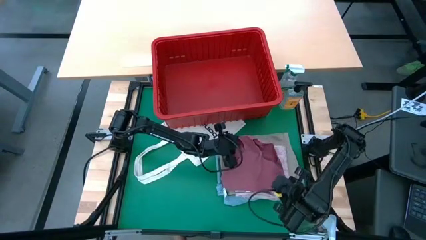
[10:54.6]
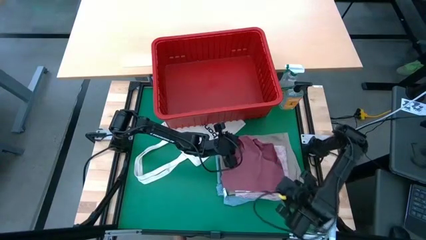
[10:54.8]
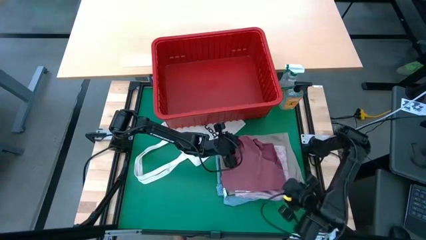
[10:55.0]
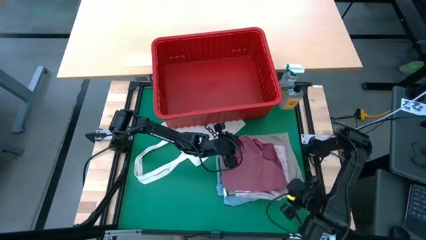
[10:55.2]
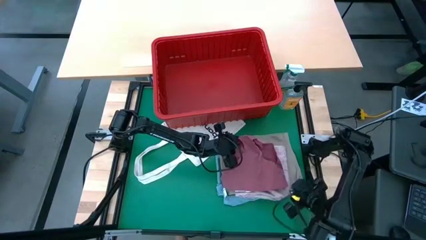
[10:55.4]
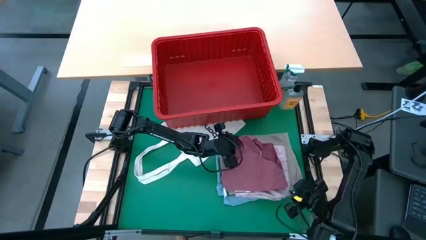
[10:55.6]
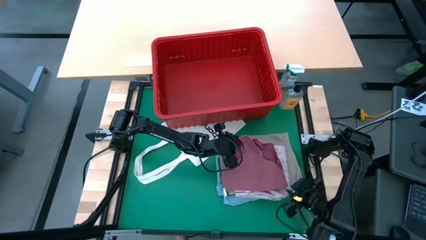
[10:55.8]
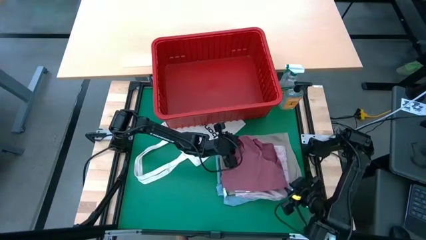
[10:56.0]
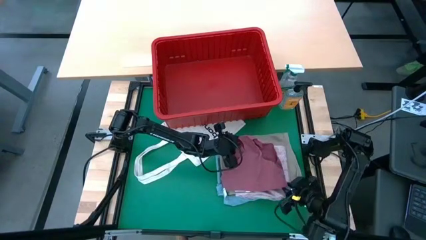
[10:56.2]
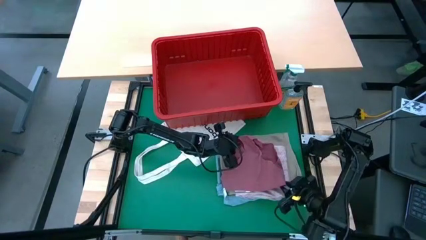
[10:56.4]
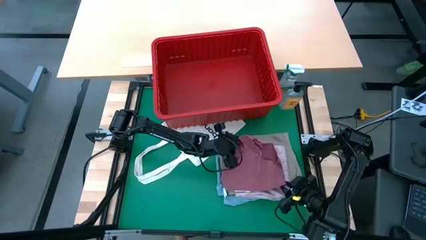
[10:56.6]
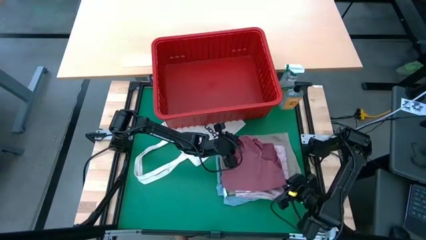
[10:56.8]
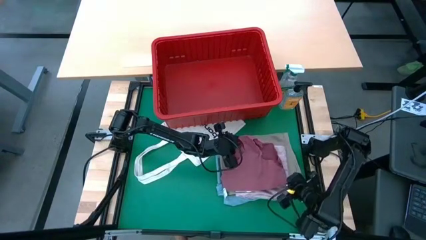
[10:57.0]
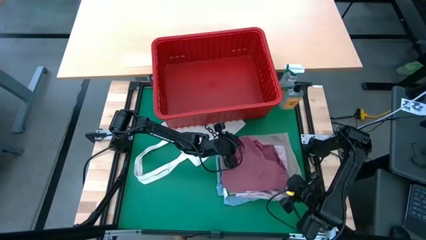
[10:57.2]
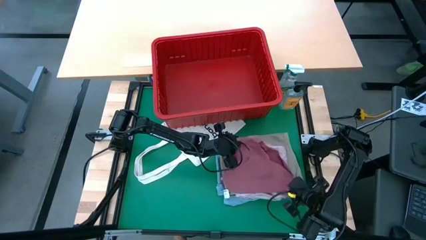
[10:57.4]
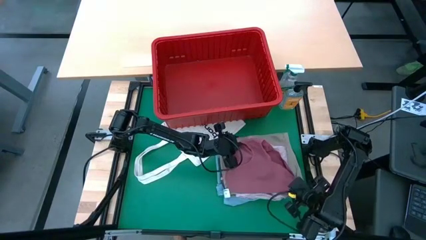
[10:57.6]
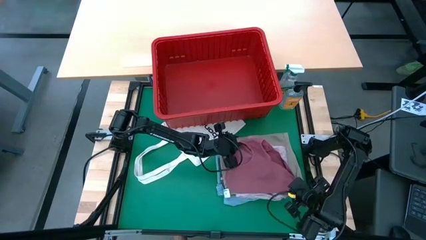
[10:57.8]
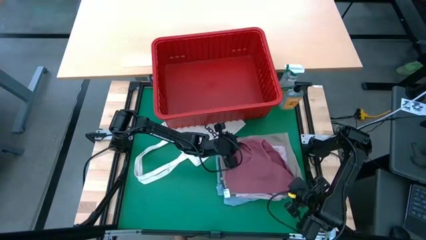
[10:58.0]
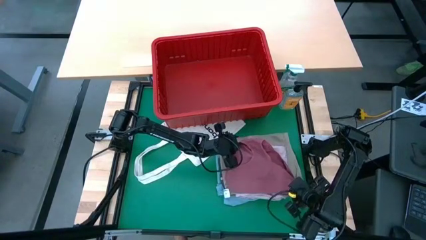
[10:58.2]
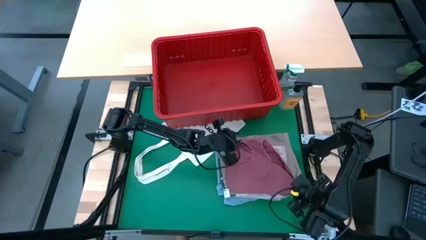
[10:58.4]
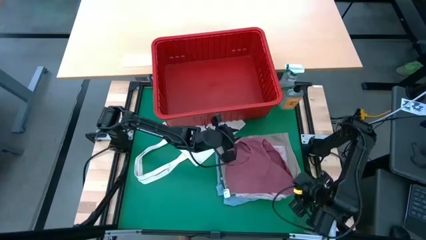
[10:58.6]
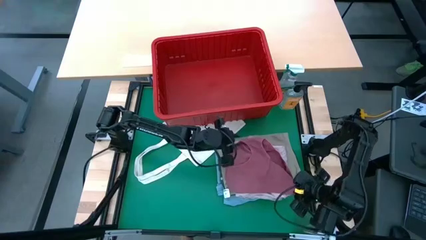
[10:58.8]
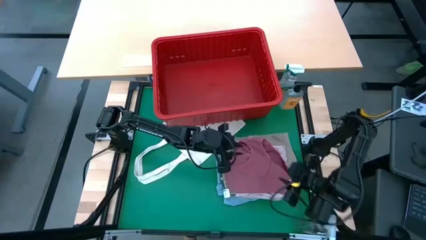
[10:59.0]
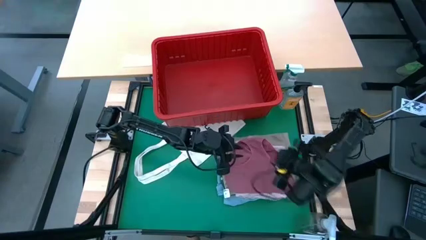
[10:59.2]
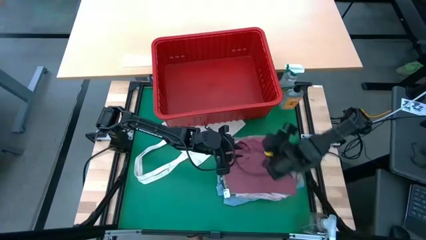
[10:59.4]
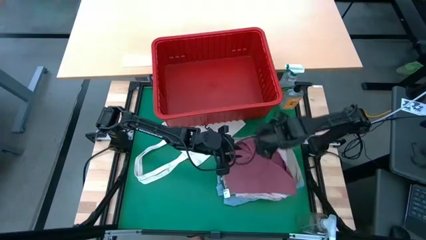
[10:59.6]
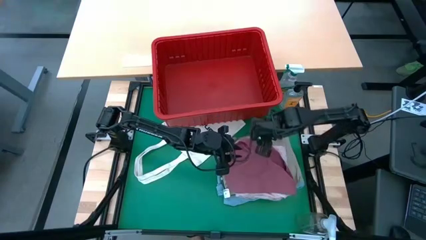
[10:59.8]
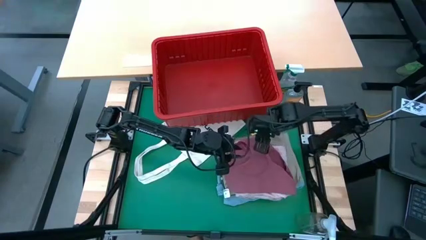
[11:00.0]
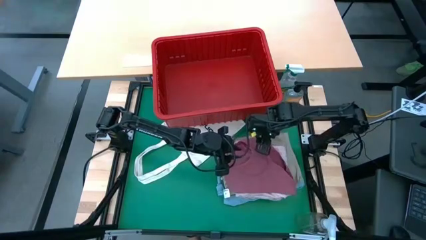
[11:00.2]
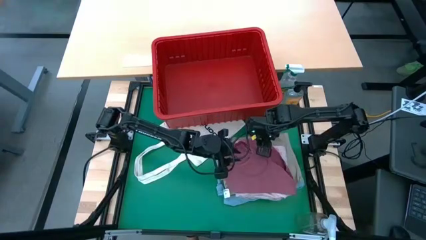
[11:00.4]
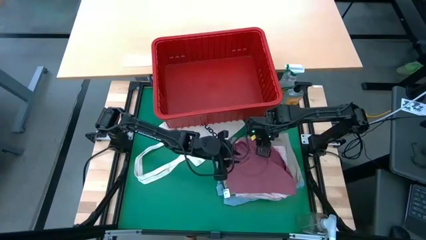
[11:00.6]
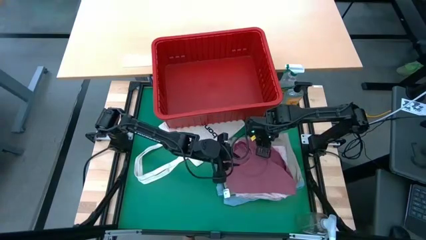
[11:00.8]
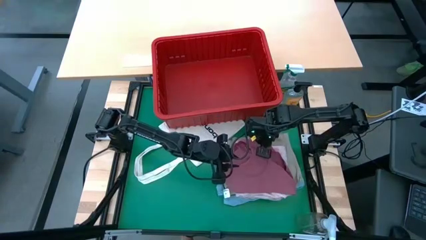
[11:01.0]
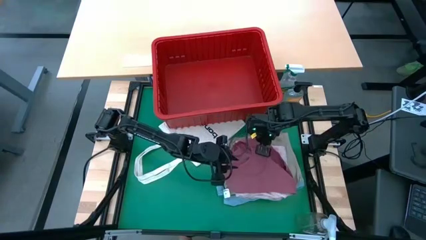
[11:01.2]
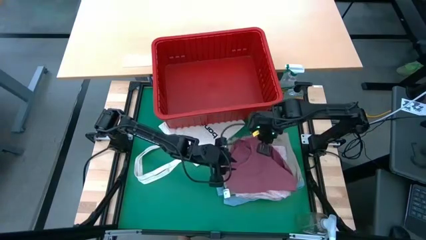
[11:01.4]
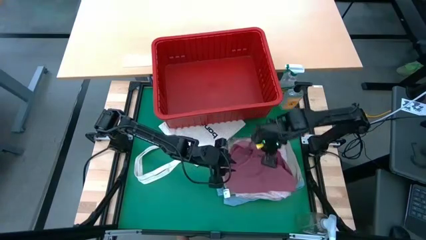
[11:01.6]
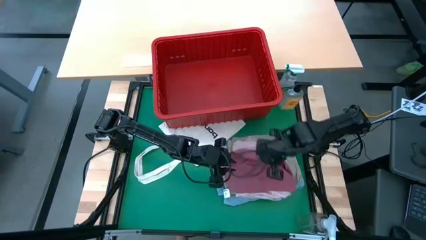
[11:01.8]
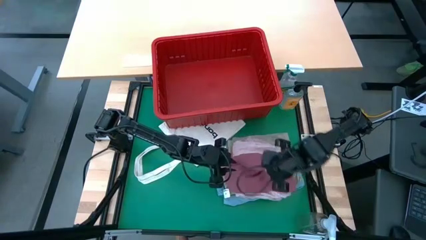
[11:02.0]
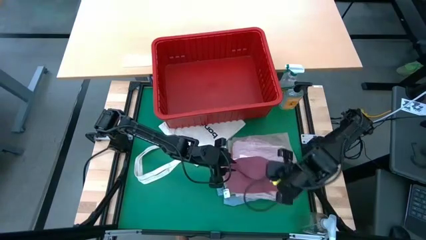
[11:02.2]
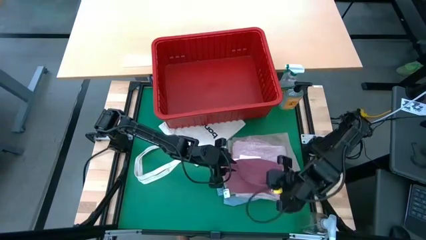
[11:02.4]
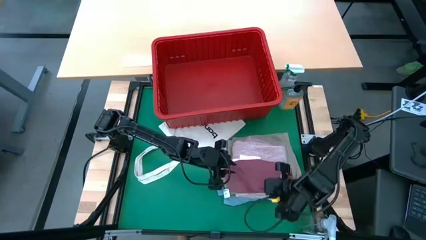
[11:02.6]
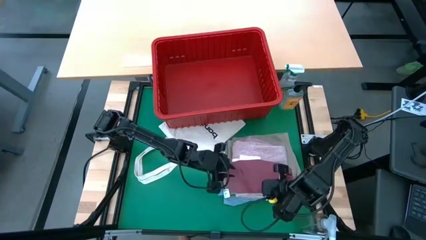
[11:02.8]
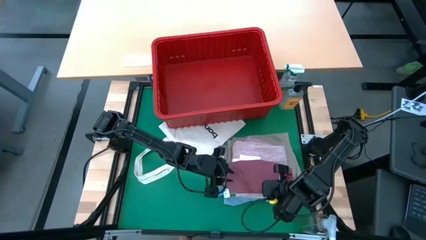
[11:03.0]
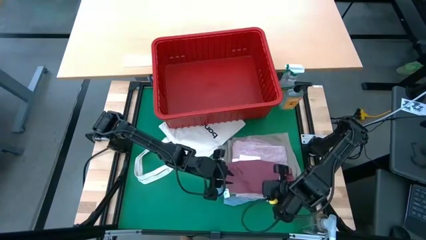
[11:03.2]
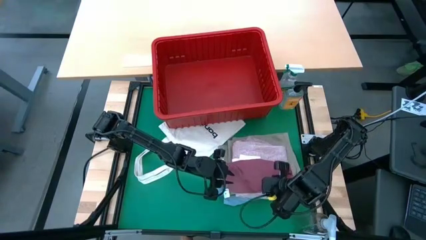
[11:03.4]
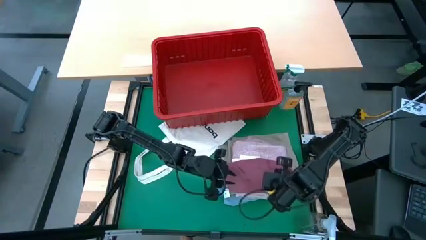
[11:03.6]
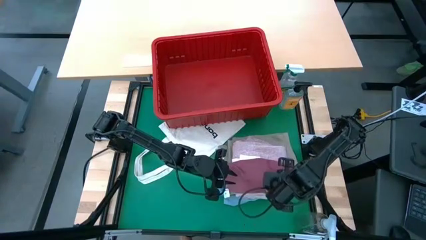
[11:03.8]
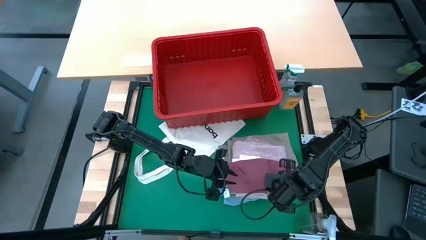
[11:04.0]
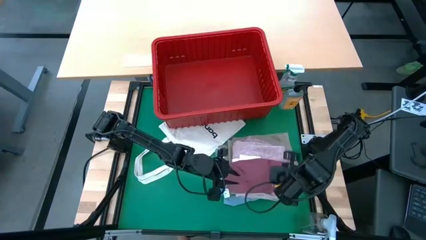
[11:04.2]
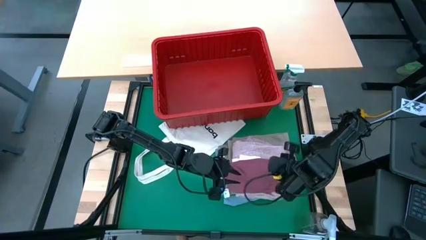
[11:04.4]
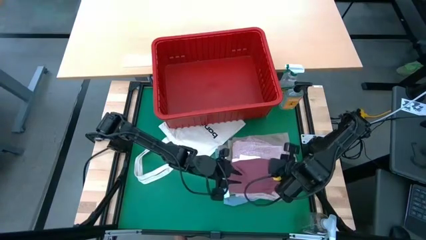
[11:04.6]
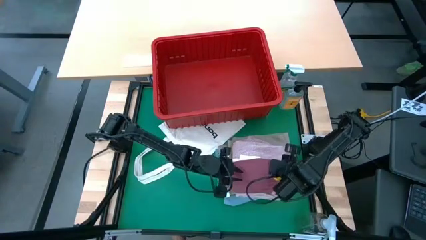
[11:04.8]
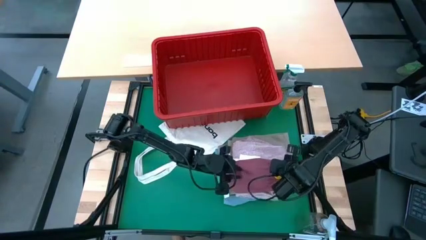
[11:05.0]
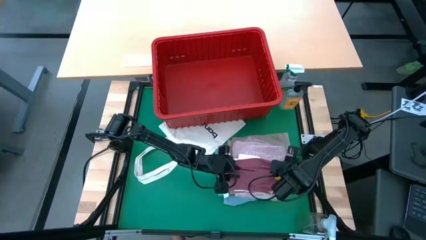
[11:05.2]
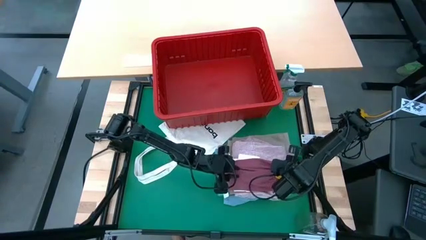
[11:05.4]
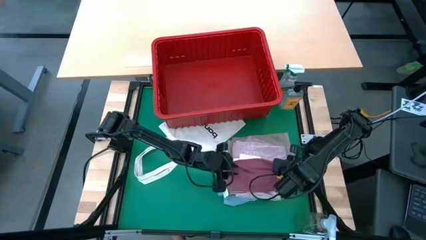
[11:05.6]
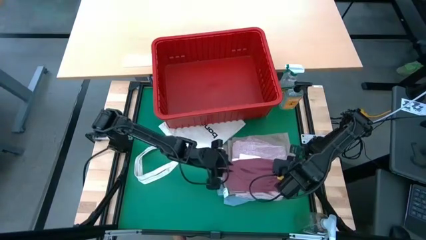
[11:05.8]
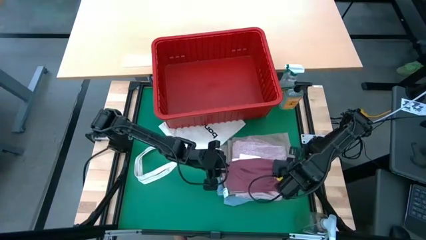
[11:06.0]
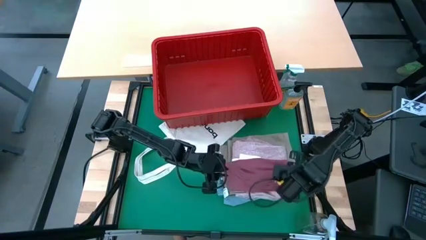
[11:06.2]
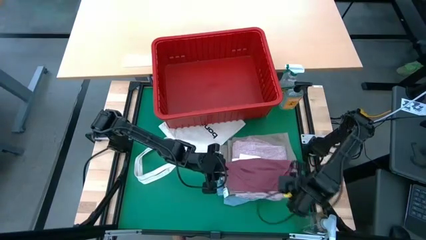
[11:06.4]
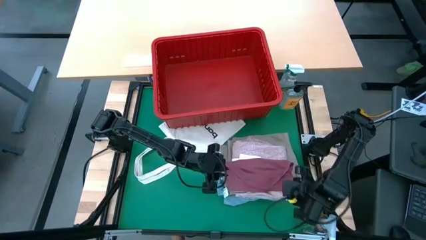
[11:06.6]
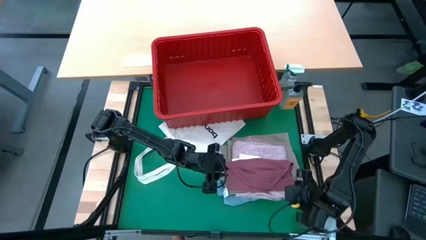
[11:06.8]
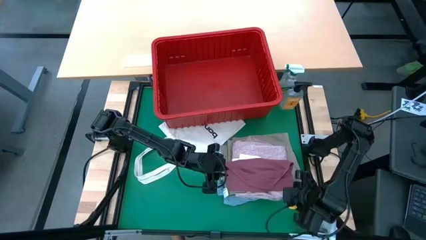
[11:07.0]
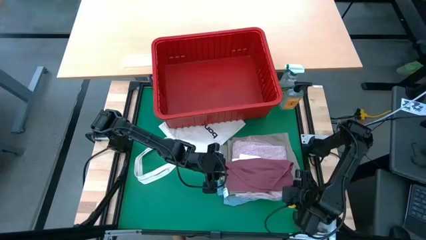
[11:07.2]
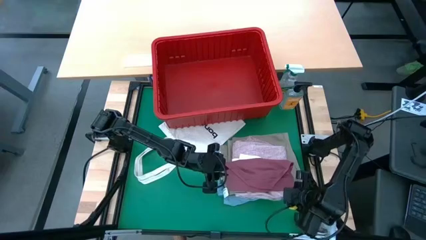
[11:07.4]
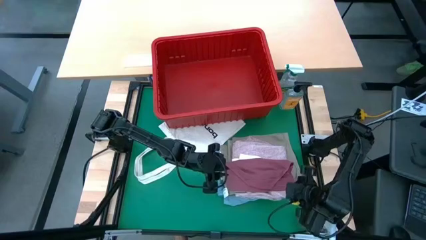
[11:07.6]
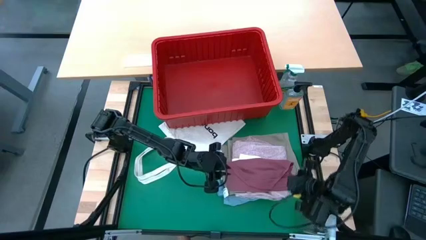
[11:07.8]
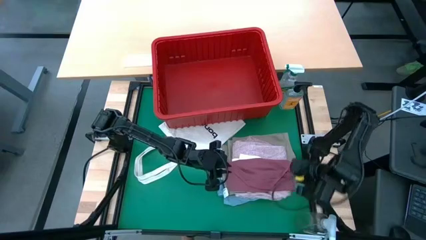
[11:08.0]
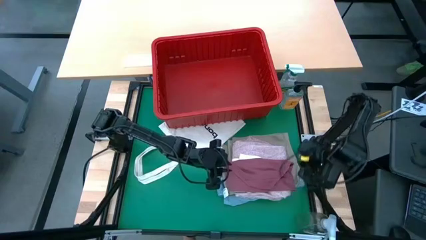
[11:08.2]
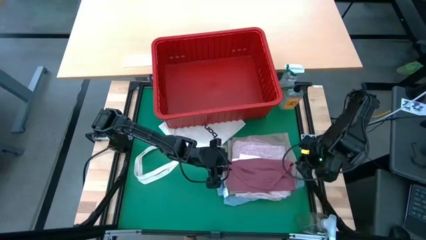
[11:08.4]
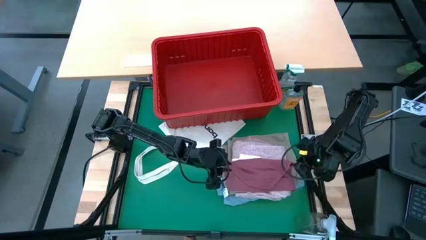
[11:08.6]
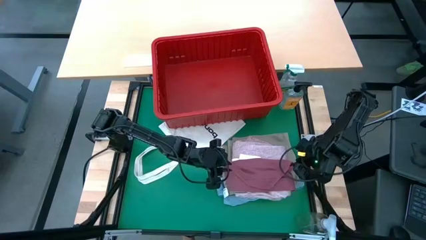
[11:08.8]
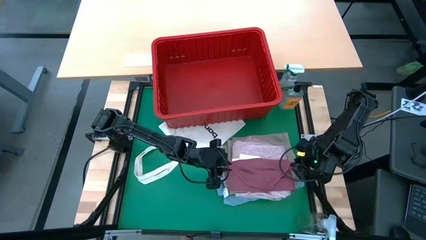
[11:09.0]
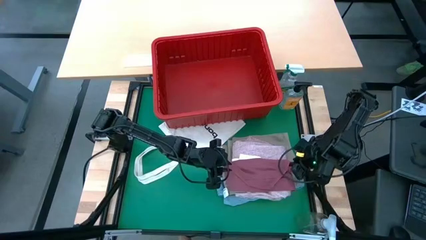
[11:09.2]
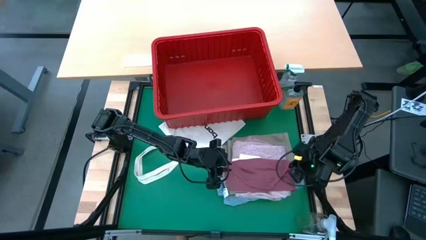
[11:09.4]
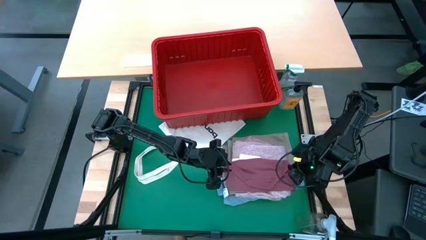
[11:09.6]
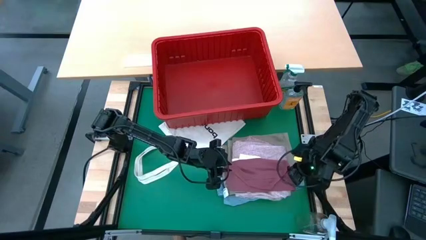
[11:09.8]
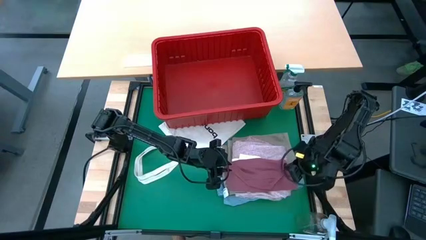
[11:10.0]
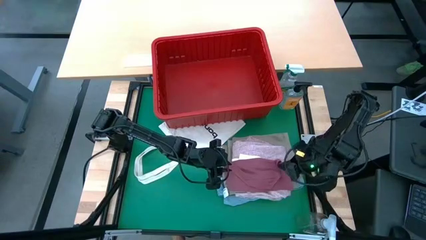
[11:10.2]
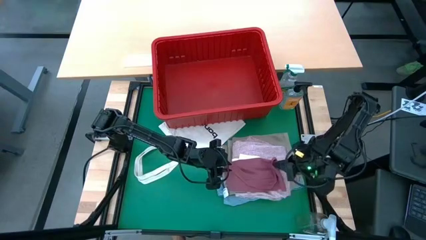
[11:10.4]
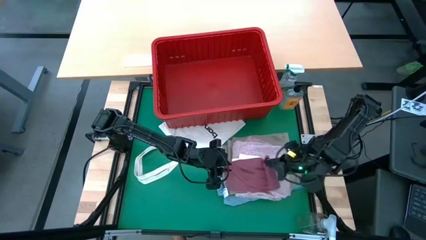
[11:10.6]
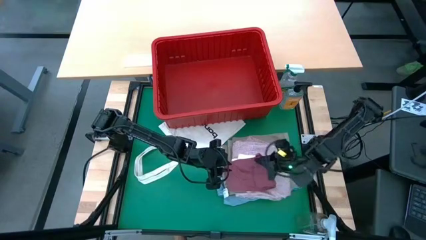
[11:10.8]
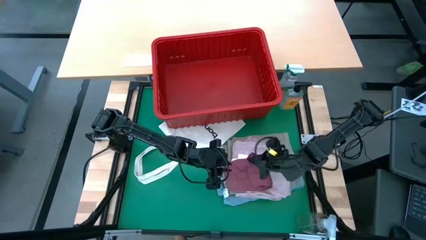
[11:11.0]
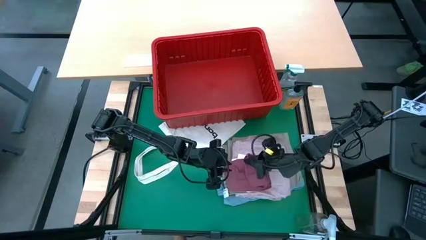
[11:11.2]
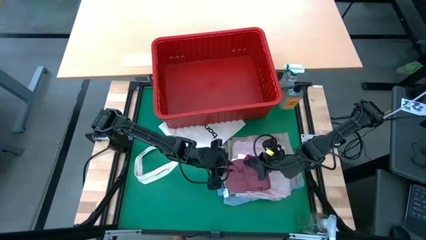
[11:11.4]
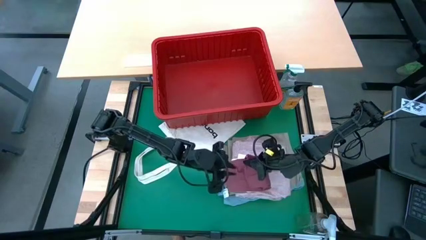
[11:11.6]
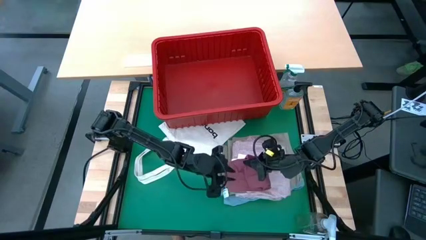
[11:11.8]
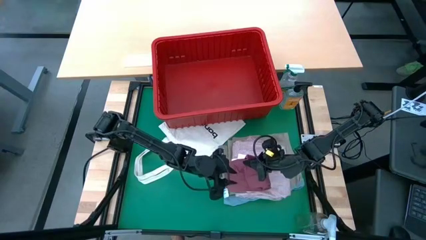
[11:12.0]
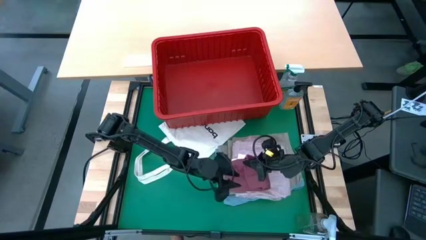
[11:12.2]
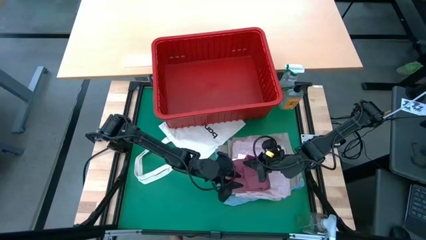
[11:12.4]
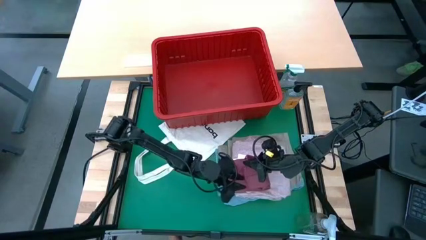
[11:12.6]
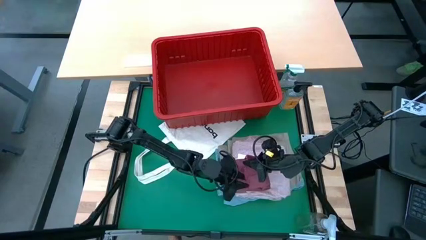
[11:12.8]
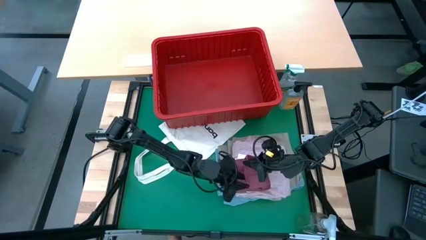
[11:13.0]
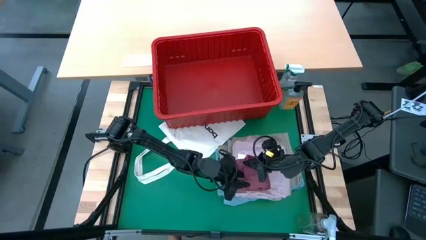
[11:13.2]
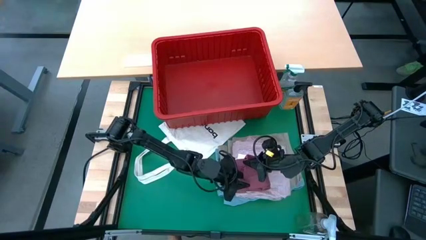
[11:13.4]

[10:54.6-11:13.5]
Task: Fold laundry
Fold the red underwear
